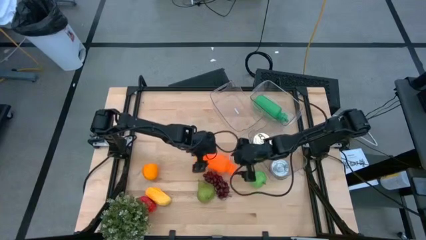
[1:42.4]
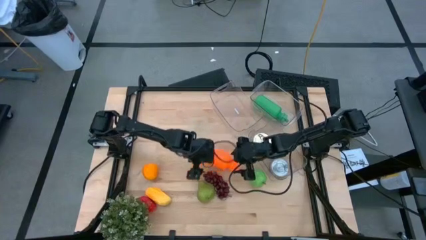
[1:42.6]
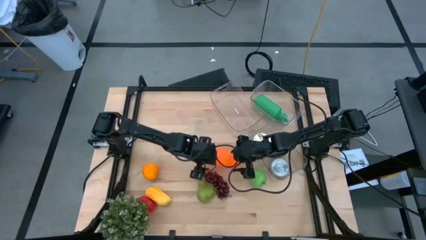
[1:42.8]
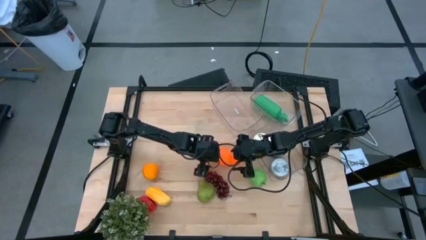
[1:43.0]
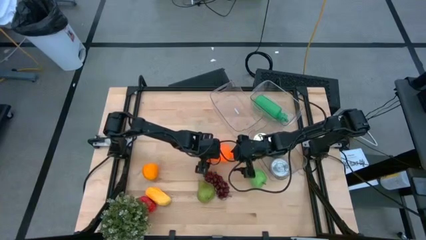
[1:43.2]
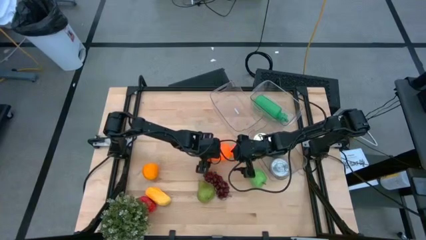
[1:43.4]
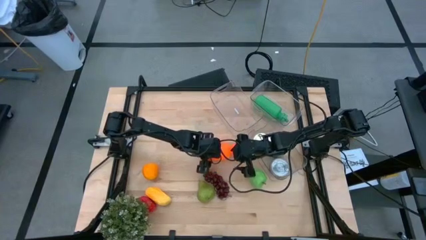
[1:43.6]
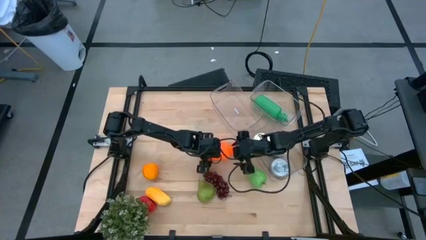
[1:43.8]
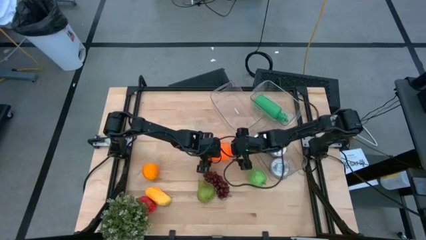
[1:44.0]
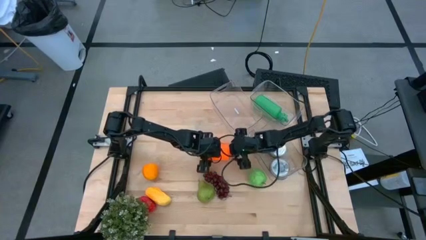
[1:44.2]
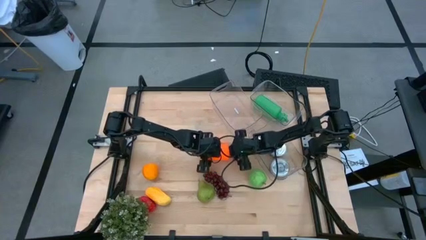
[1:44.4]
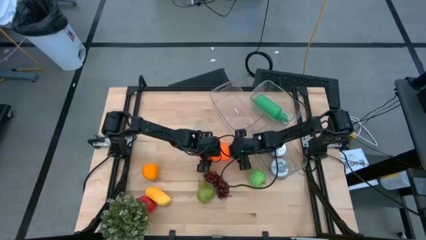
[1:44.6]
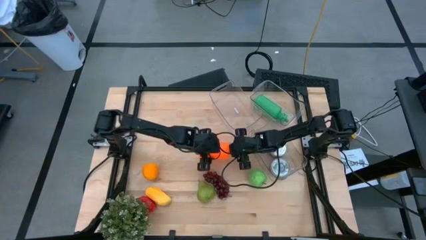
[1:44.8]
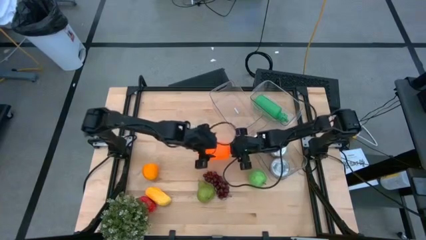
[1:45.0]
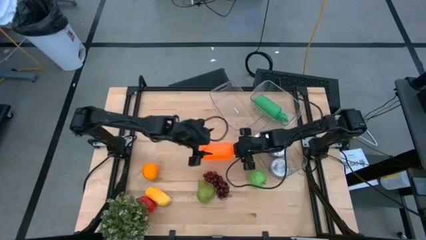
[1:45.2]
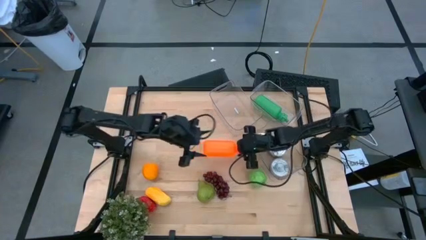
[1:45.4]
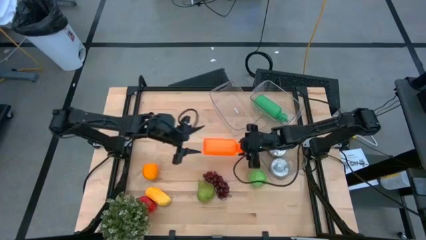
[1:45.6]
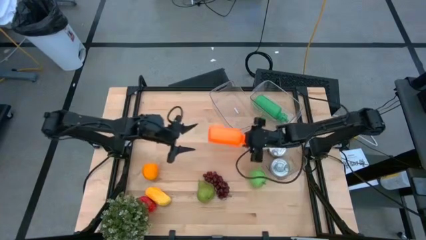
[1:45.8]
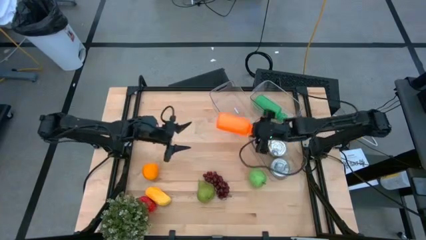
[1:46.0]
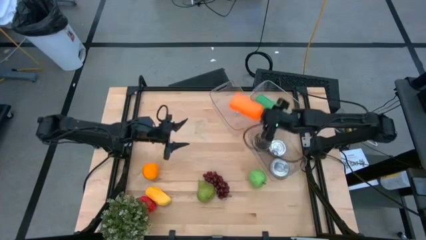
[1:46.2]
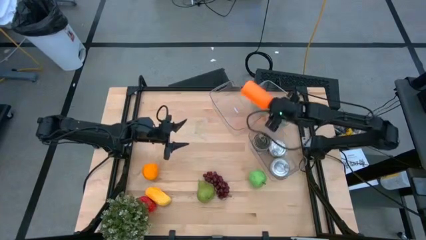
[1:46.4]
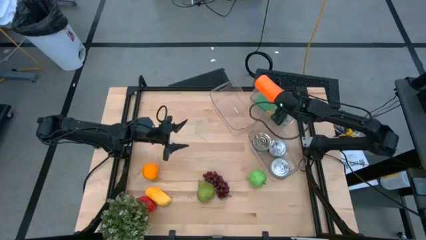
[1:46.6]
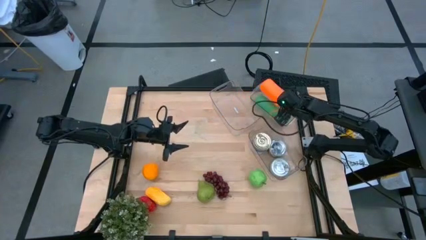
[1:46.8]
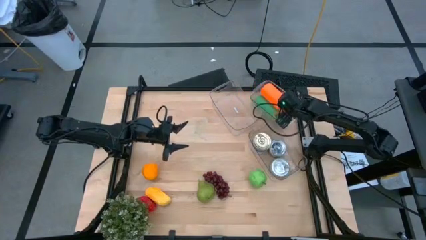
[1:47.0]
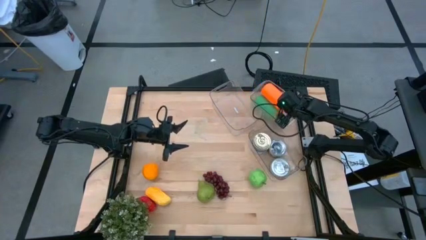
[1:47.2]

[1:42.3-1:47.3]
Task: Pick & Place Food Item
Put the orange water bottle into the top right transparent bin

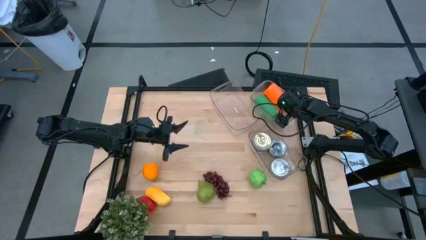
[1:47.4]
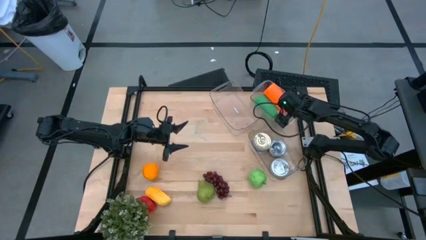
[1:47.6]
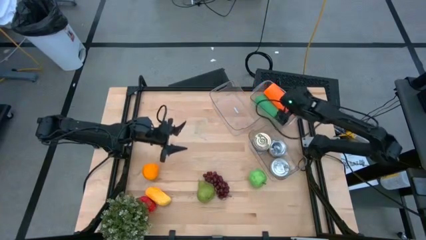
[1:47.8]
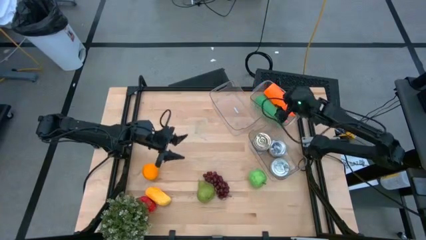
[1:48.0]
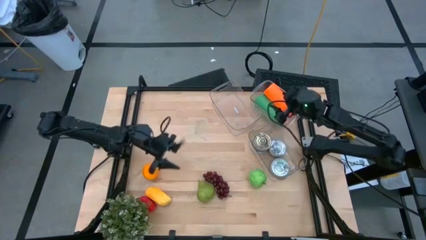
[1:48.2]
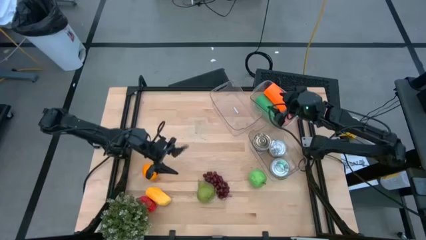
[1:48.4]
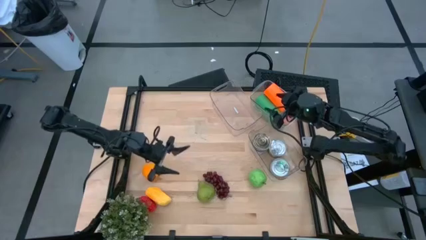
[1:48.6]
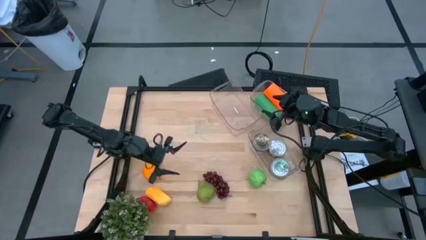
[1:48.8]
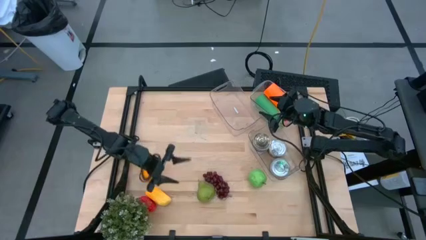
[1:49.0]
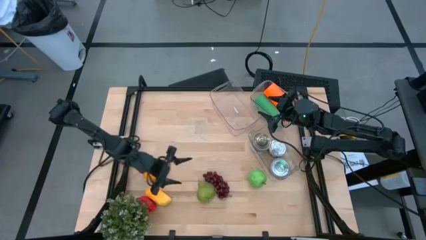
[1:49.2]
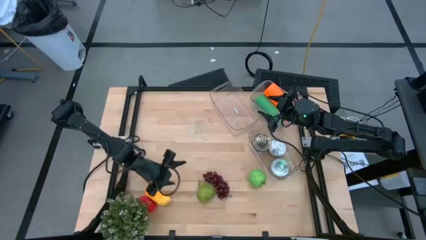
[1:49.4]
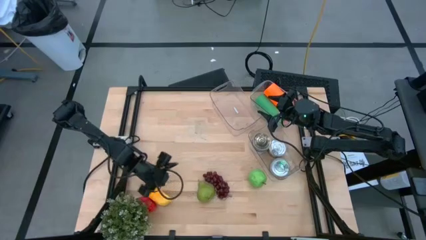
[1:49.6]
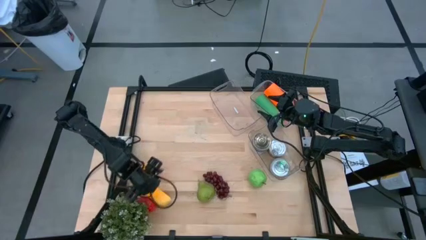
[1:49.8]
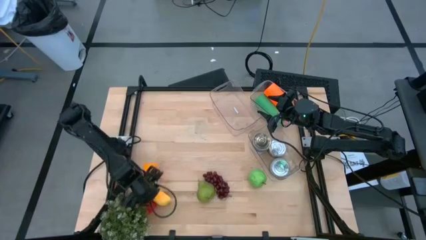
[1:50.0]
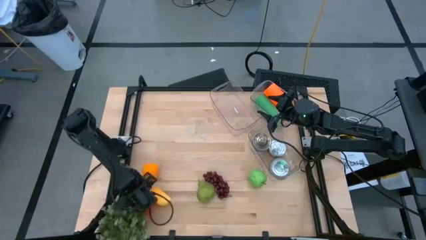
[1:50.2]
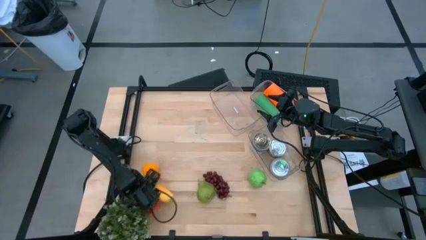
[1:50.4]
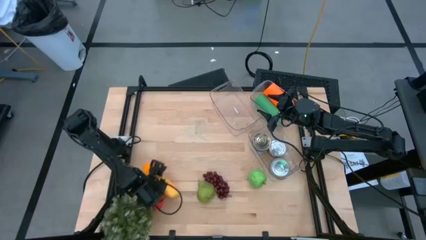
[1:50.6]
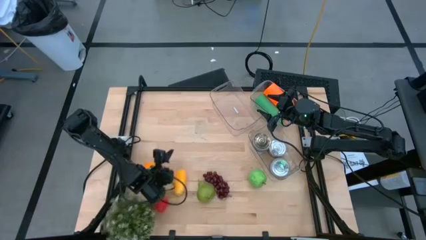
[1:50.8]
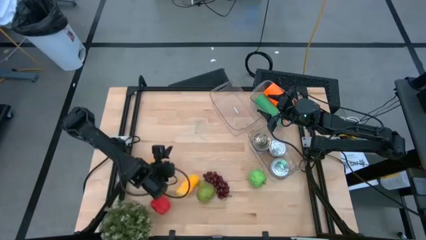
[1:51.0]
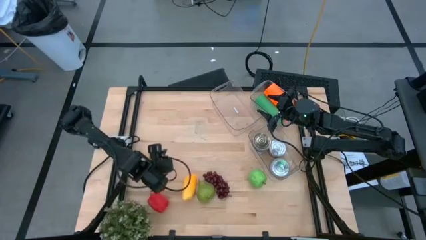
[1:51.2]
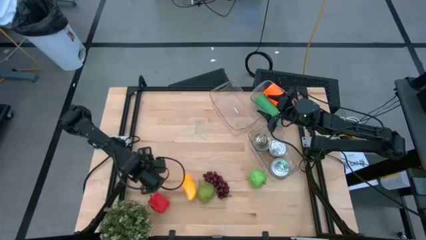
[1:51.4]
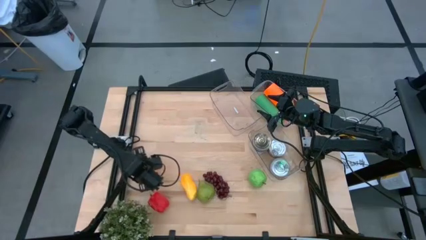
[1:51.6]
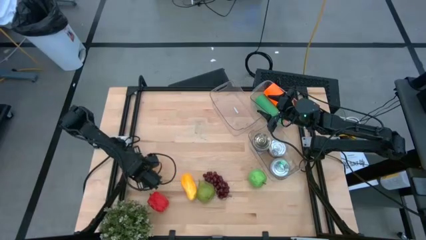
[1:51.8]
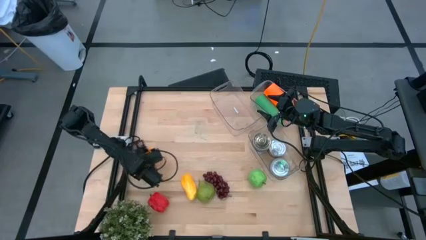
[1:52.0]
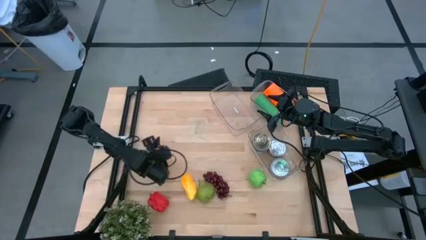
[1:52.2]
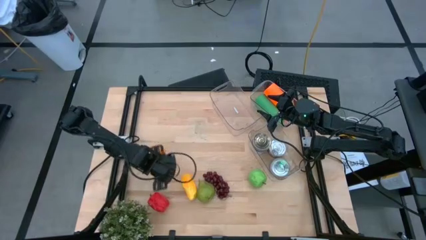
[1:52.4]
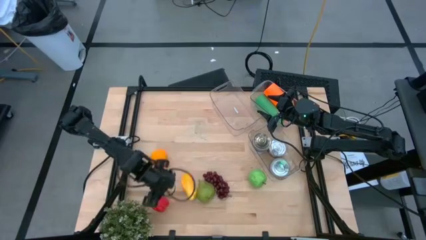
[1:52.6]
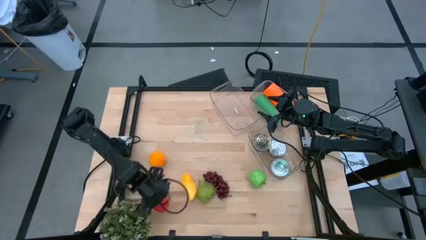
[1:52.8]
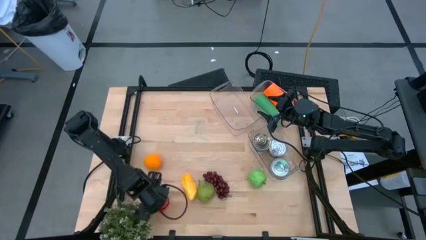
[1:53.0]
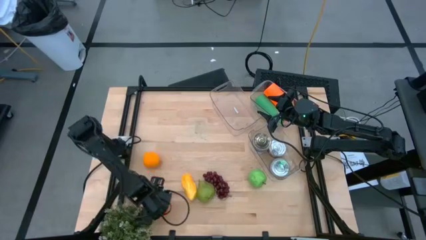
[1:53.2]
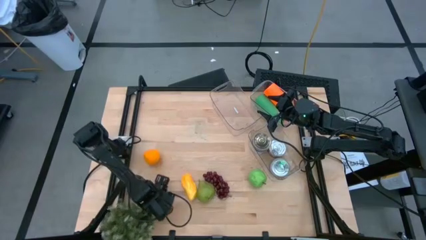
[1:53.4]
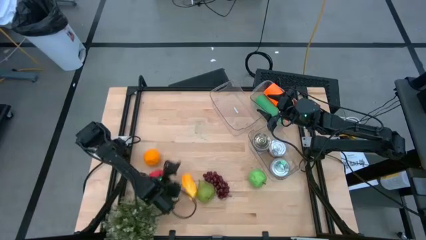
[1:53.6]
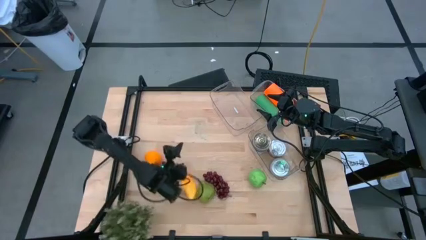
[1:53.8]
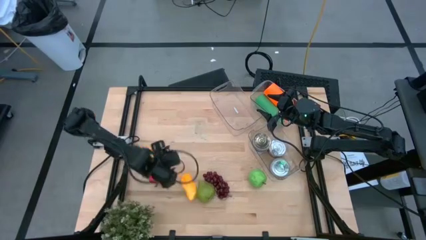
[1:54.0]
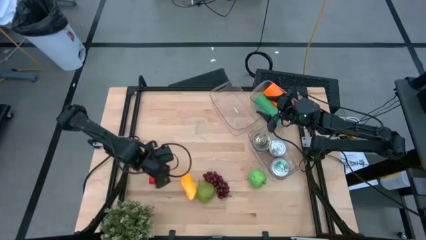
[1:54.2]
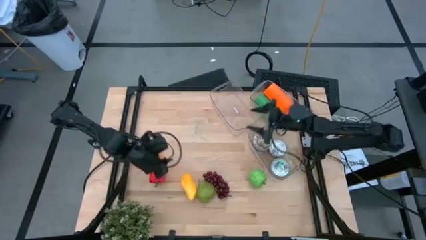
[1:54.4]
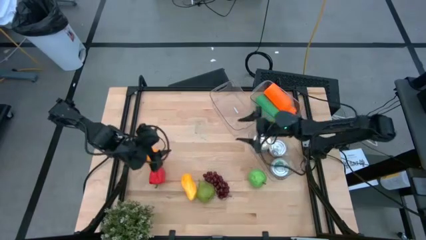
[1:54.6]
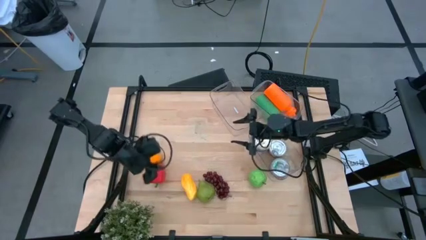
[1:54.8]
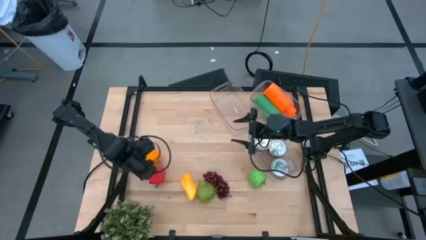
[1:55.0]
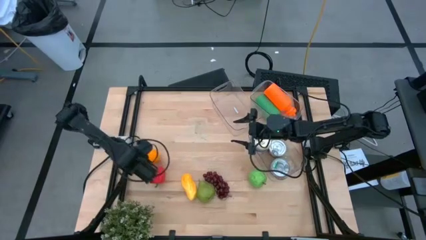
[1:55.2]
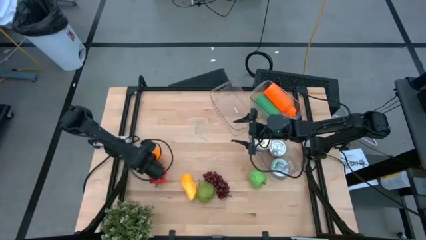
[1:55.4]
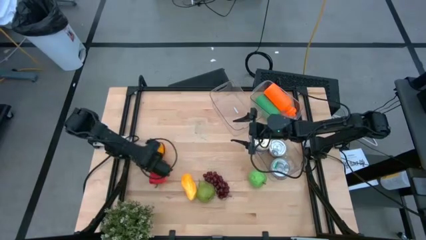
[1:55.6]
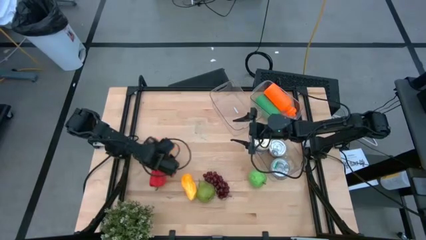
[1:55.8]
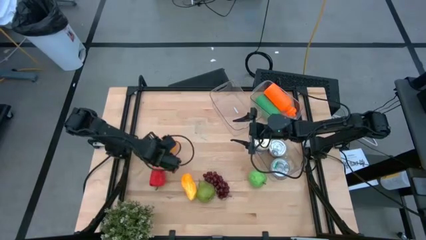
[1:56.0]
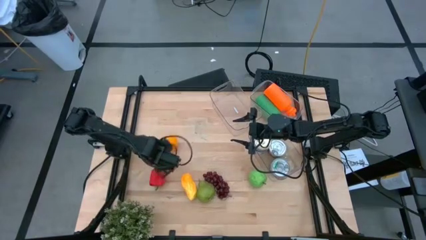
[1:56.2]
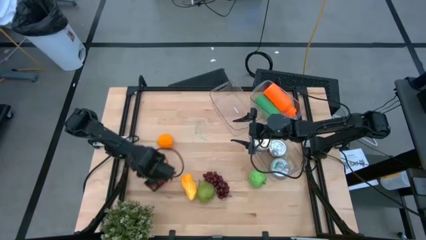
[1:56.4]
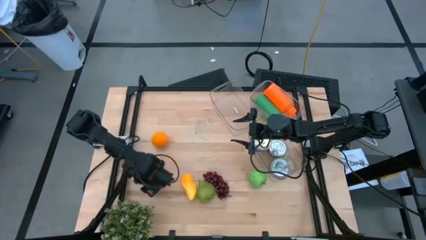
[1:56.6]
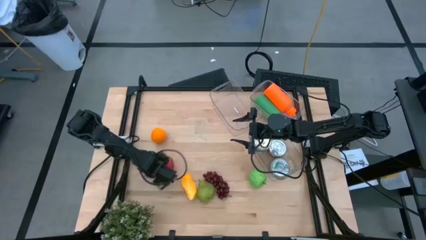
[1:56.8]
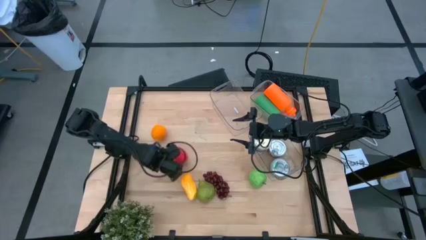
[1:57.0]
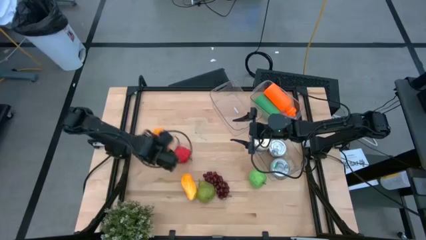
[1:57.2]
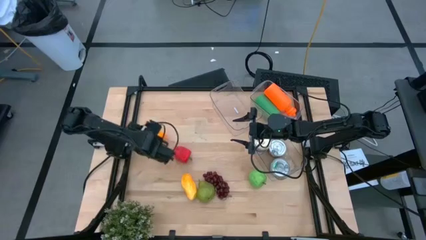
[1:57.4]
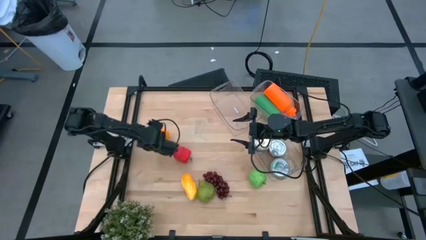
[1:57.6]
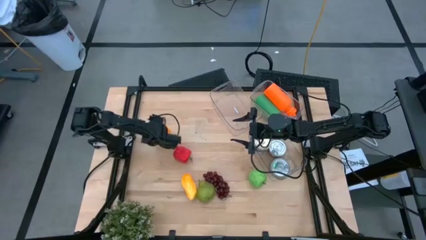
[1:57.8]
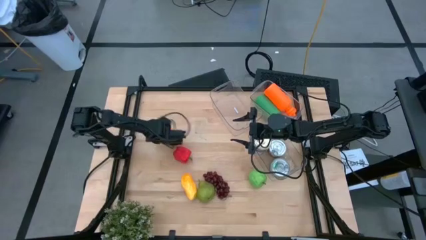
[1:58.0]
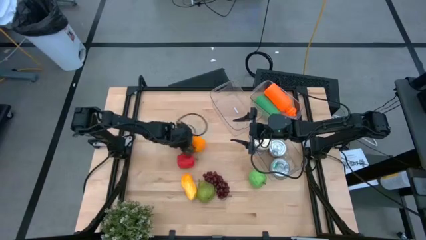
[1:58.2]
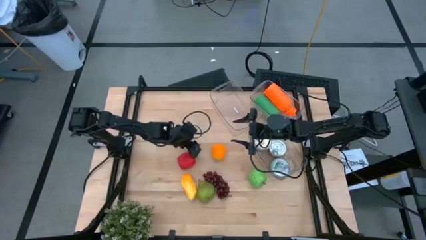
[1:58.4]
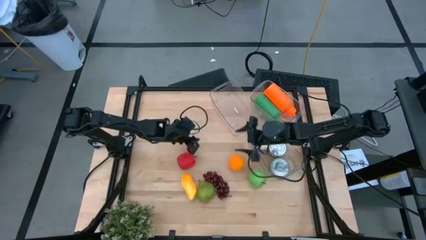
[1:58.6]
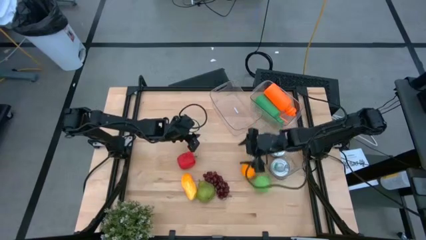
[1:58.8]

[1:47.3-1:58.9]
Move the produce to the center of the table
